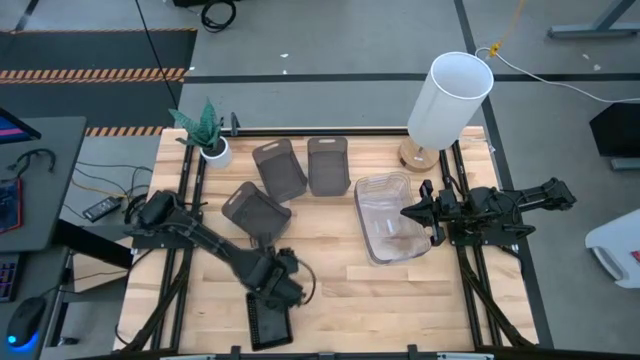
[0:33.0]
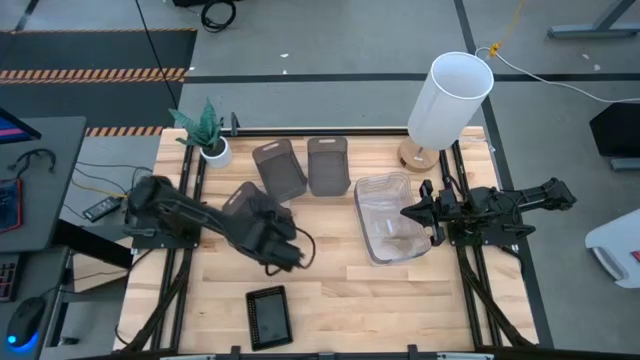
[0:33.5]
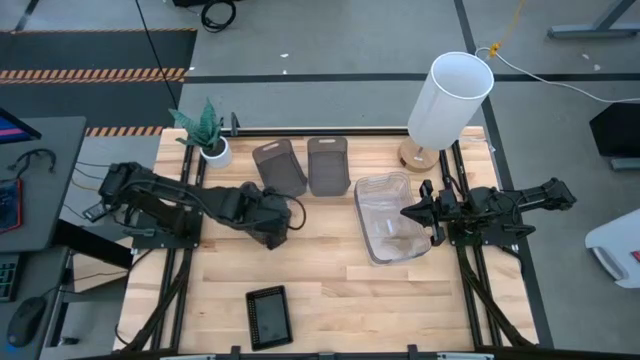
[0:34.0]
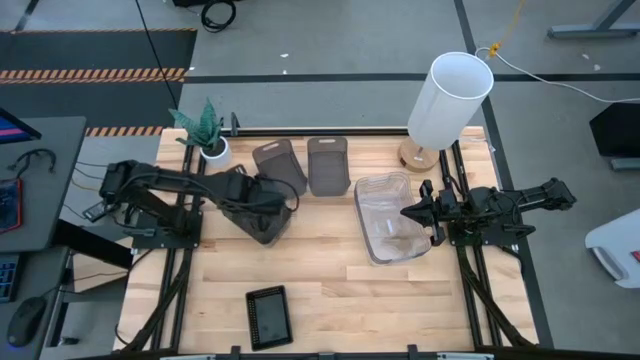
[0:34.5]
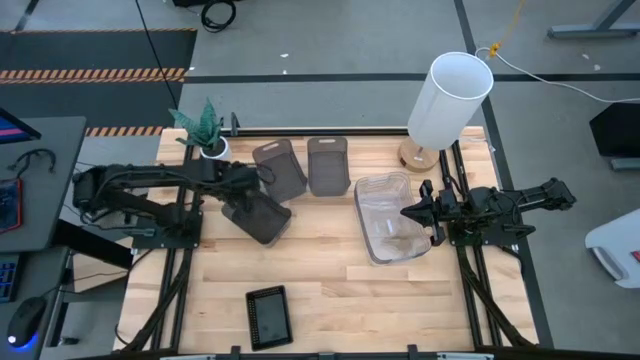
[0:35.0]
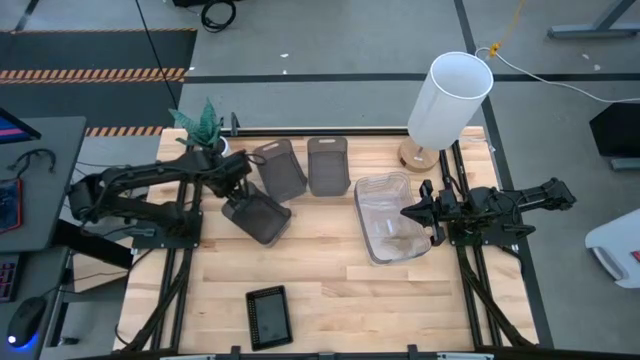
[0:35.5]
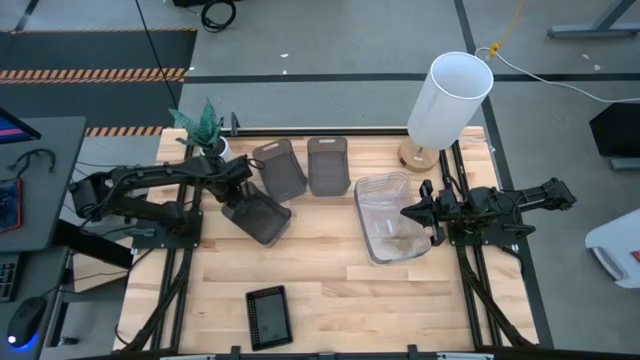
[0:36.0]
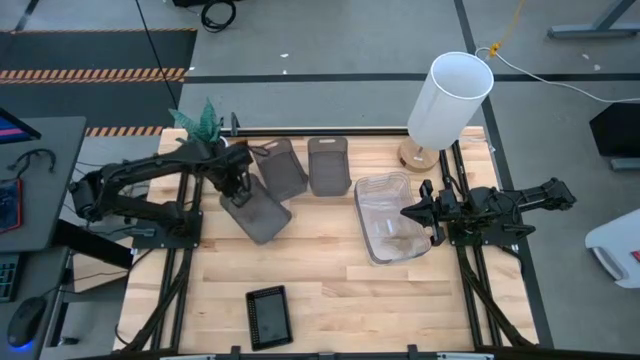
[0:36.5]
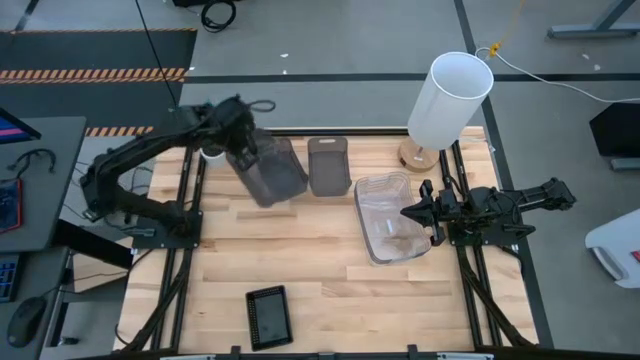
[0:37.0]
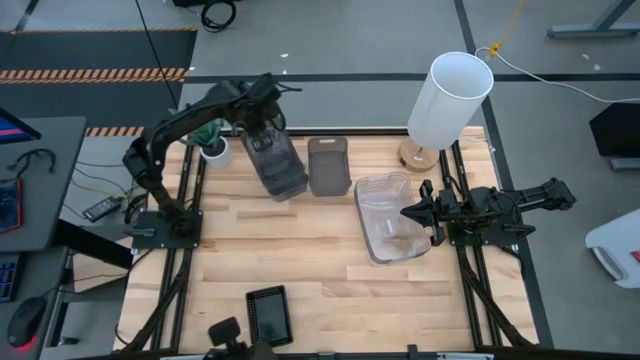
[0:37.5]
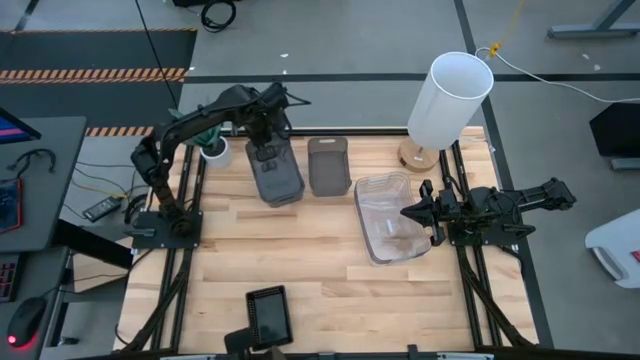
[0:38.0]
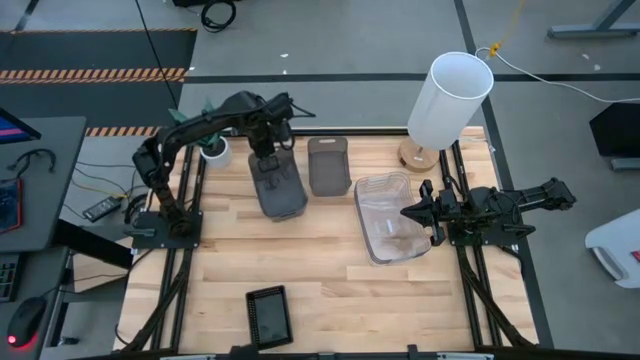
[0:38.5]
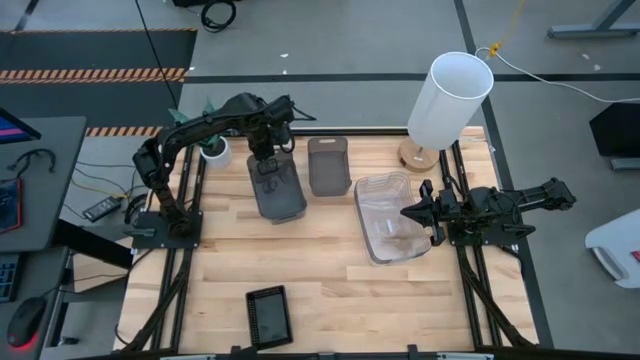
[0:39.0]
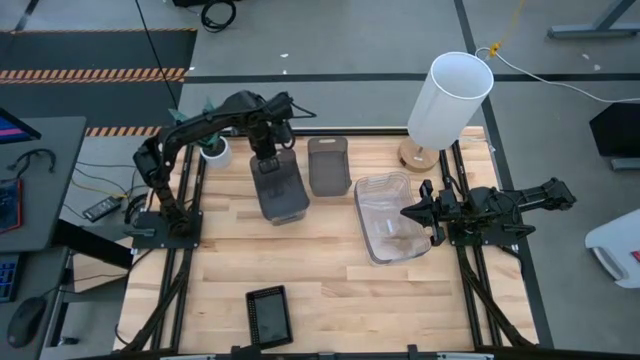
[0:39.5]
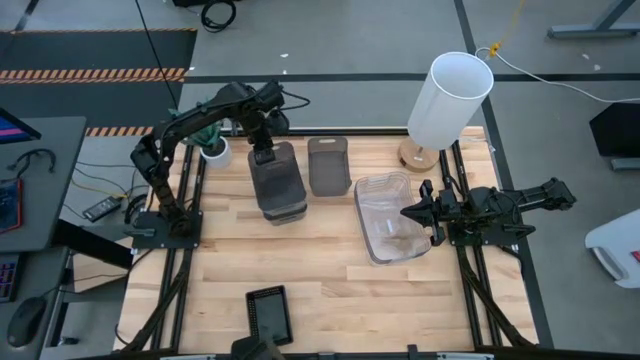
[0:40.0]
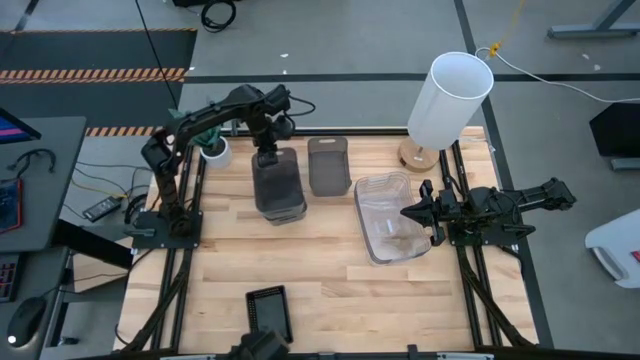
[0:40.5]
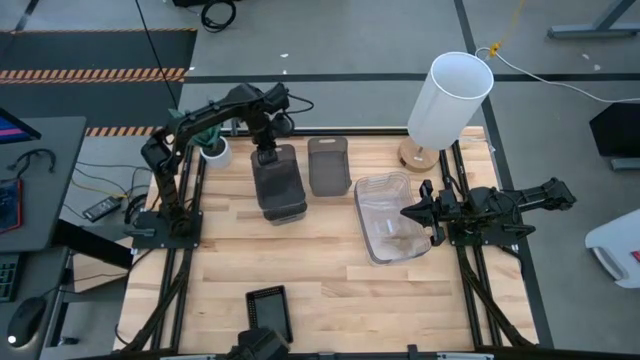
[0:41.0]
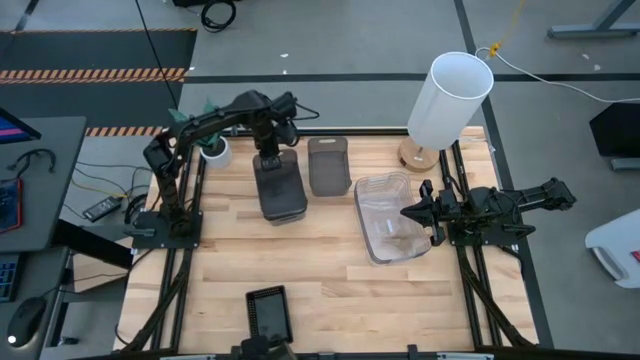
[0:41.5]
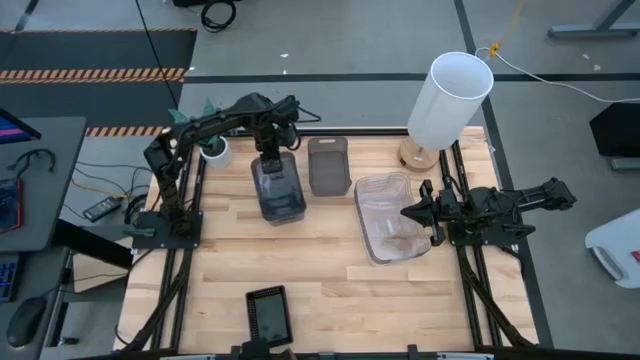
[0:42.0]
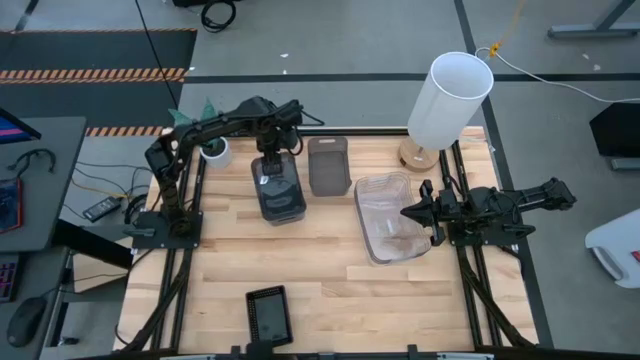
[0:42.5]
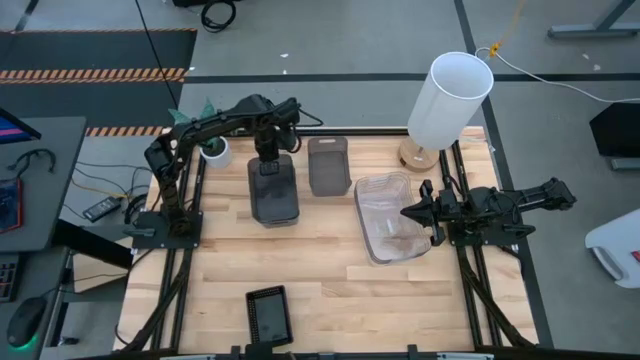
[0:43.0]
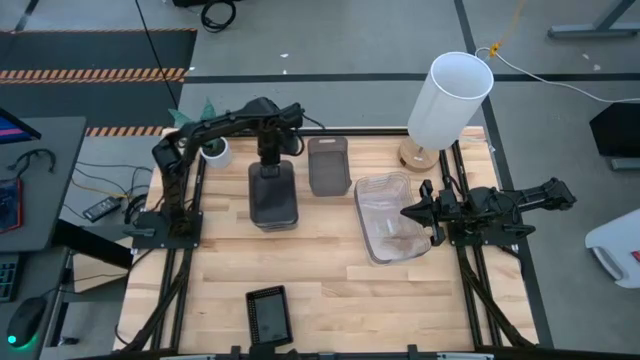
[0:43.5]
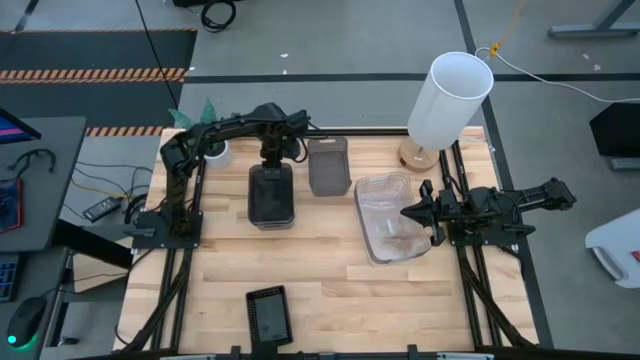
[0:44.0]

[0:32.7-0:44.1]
Stack the left gray bin on the middle gray bin

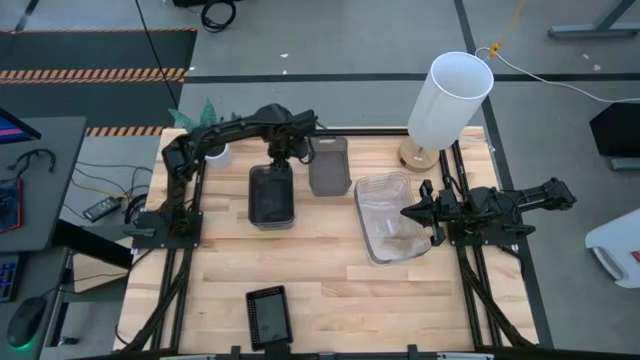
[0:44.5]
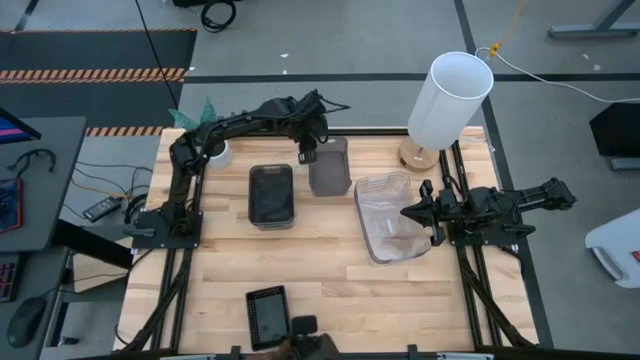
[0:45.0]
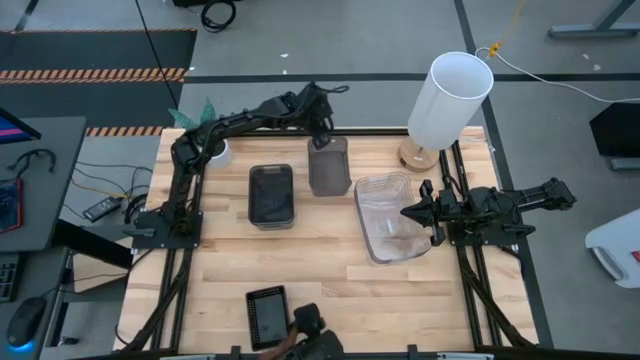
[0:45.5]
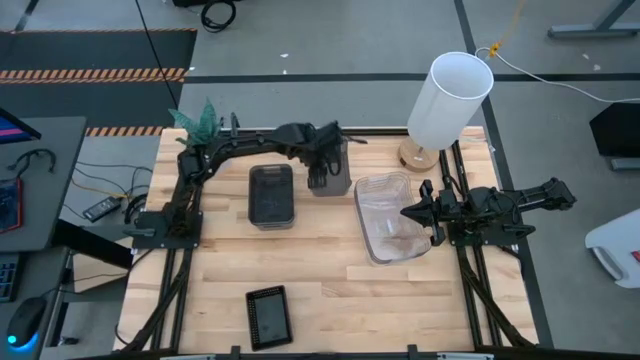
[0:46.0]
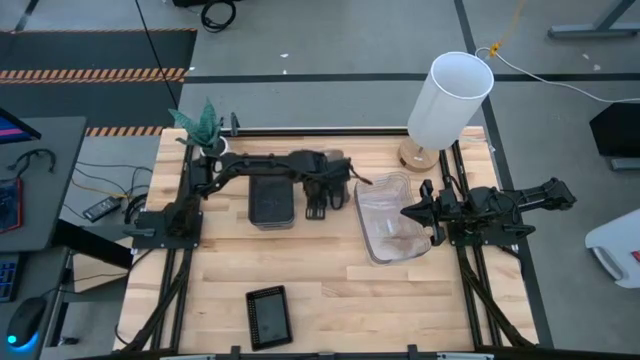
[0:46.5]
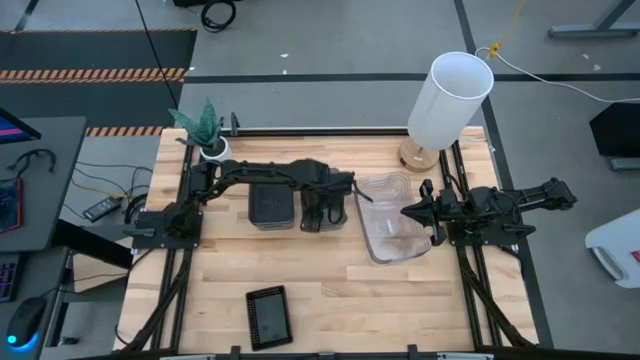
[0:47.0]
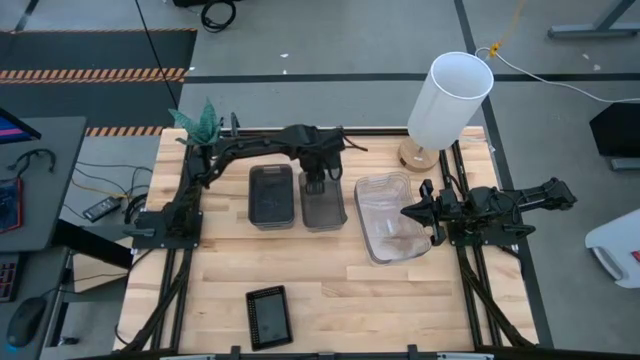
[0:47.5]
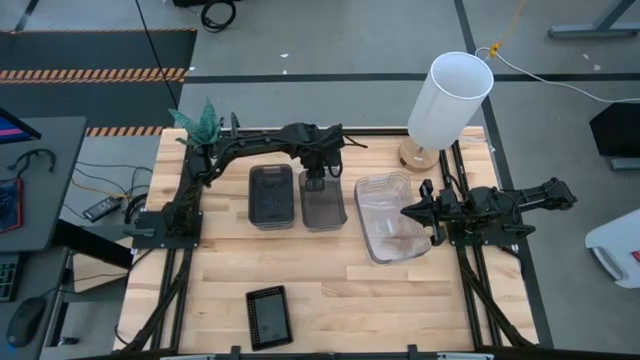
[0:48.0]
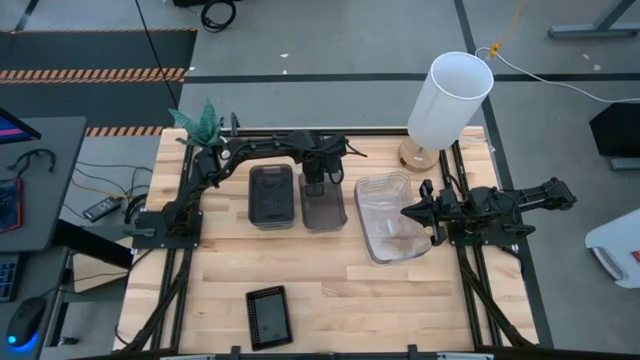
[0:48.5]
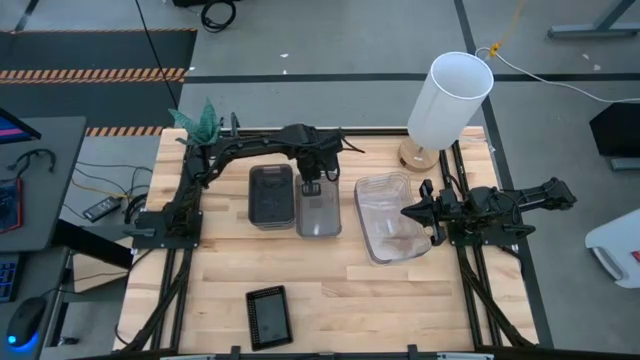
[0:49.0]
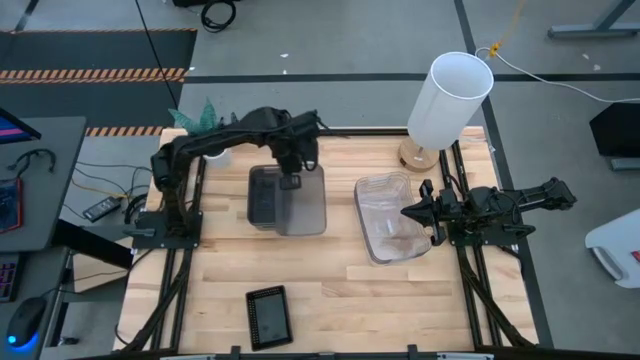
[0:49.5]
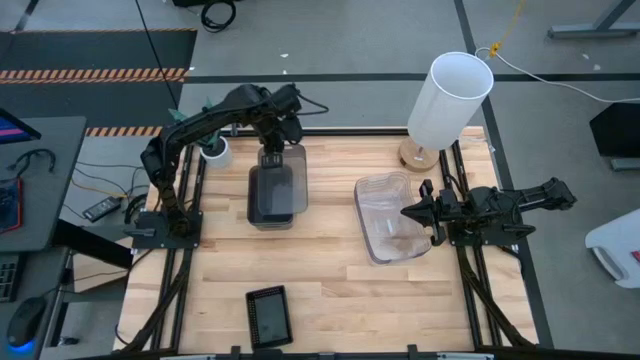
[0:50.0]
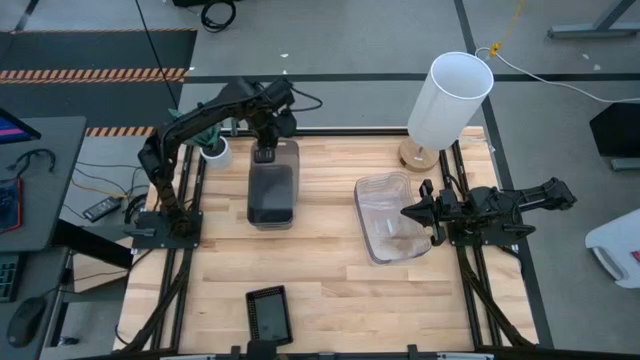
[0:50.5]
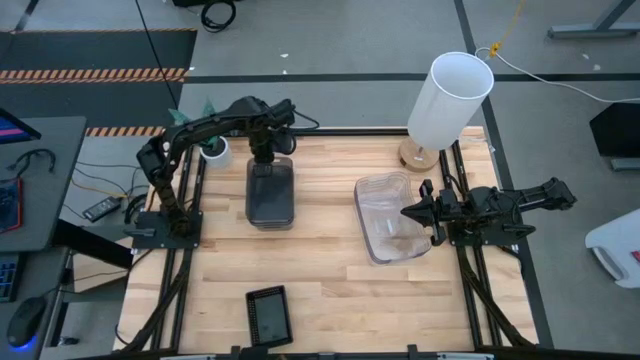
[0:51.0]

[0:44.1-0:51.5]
Stack the right gray bin on the gray bins

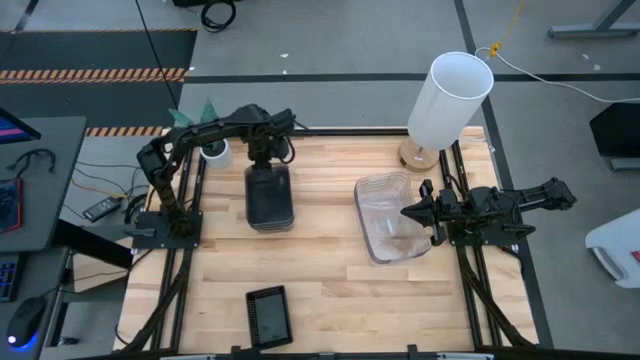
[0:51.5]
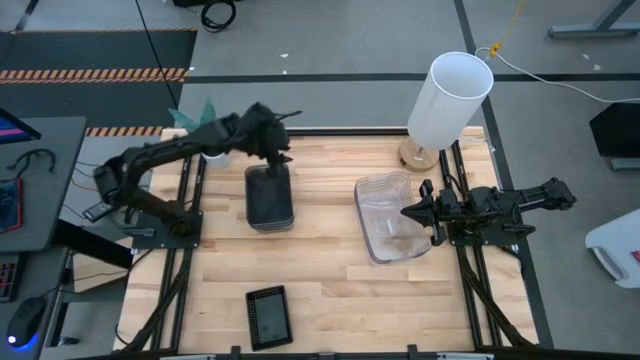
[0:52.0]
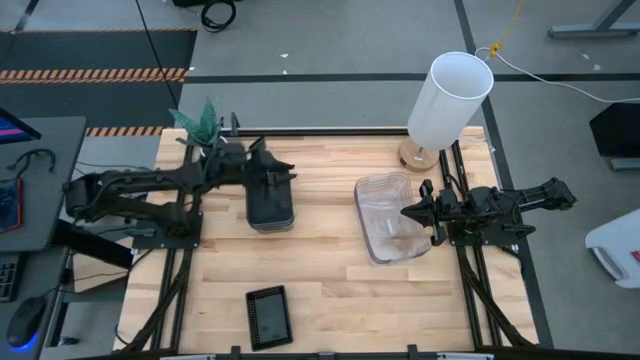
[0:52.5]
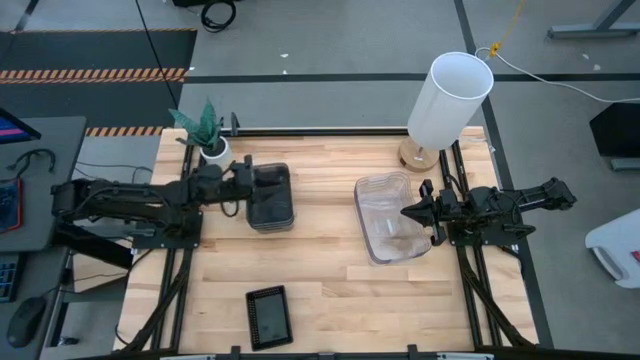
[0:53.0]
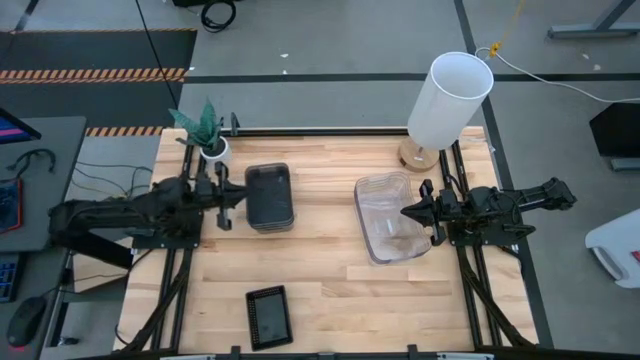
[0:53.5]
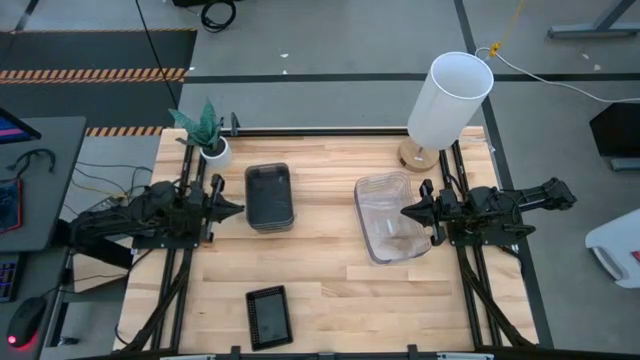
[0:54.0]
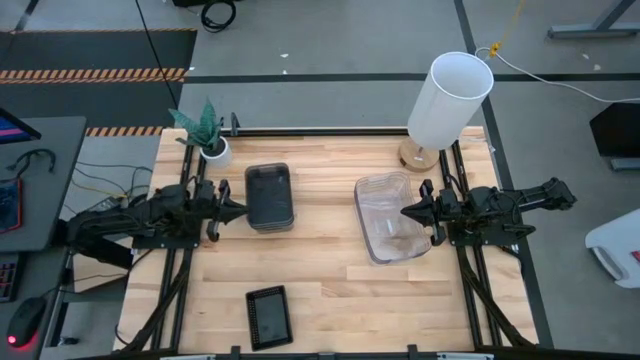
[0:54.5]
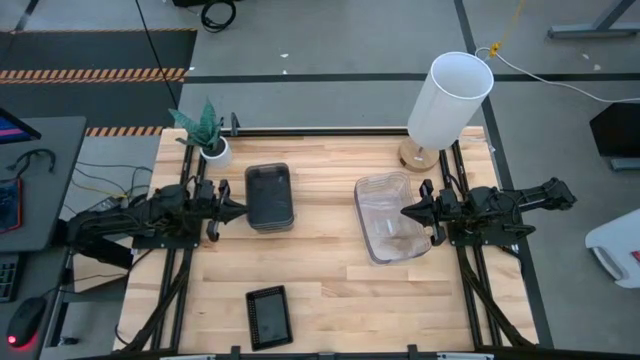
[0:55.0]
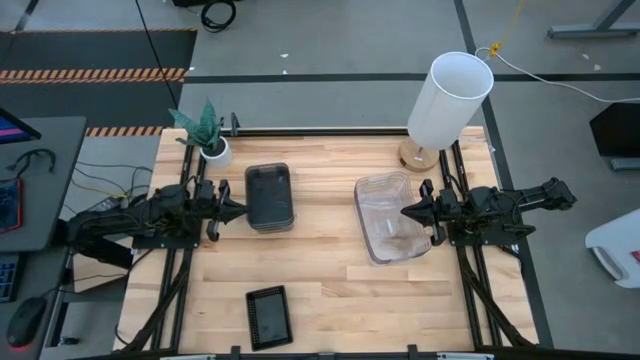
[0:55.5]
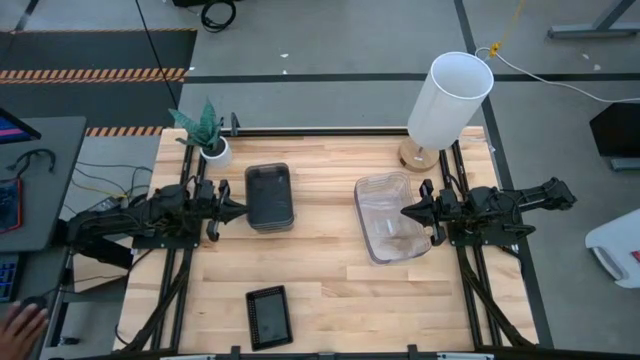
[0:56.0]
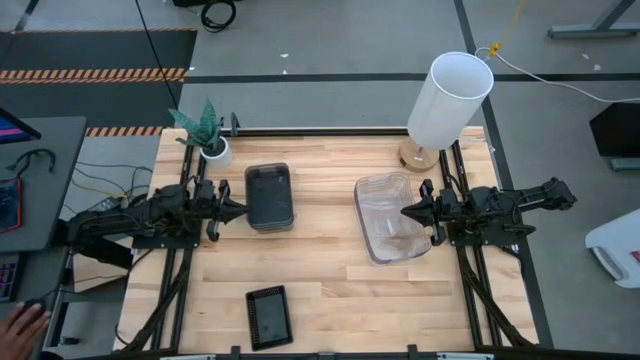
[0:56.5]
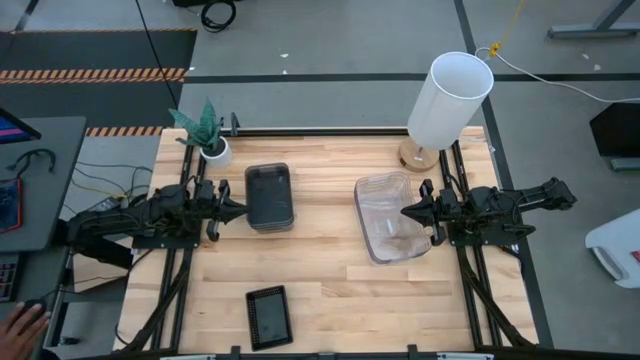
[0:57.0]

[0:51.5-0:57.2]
Return to Home Position
